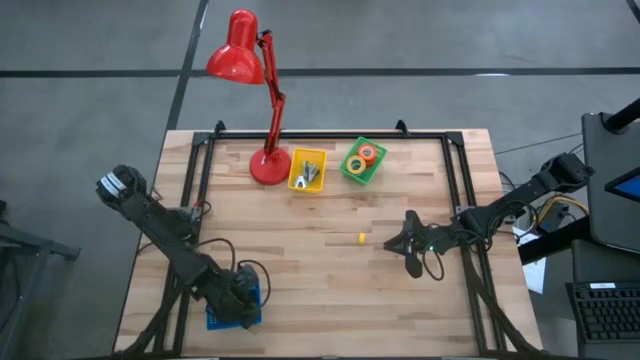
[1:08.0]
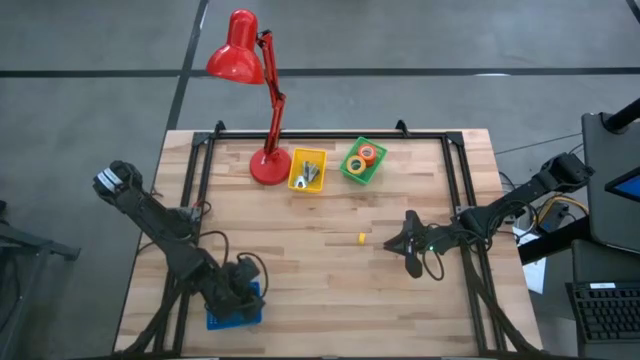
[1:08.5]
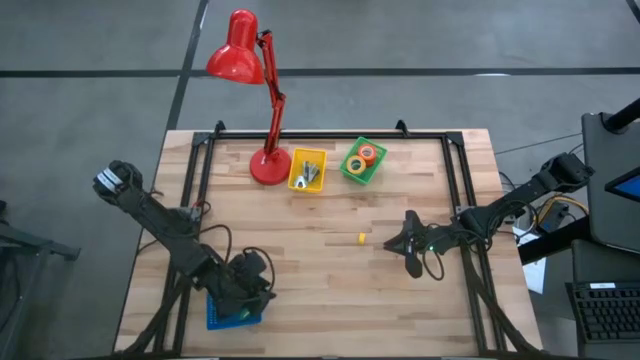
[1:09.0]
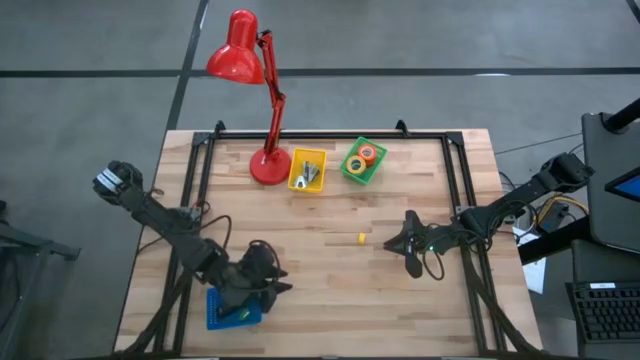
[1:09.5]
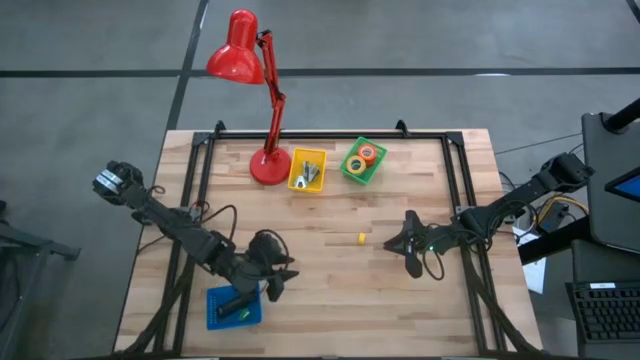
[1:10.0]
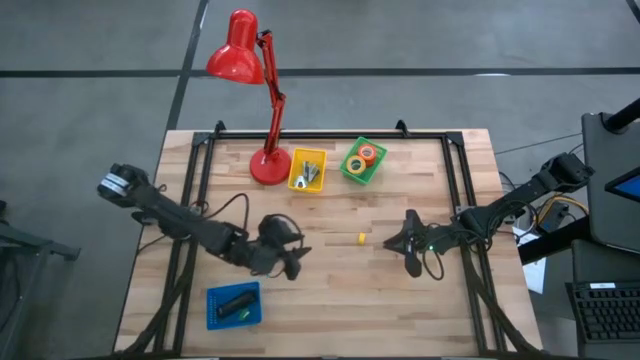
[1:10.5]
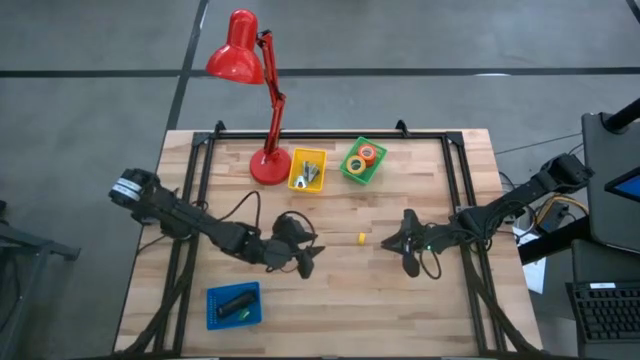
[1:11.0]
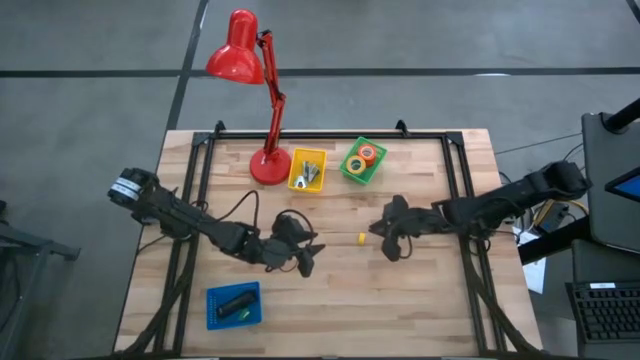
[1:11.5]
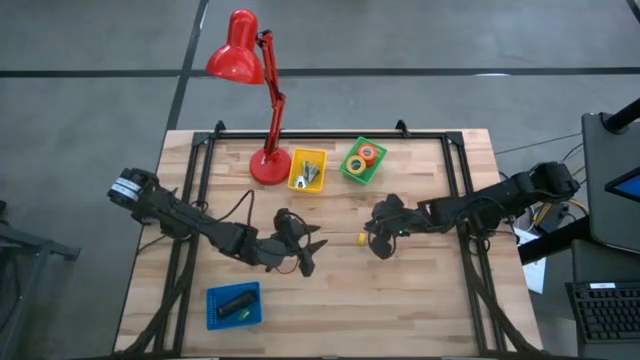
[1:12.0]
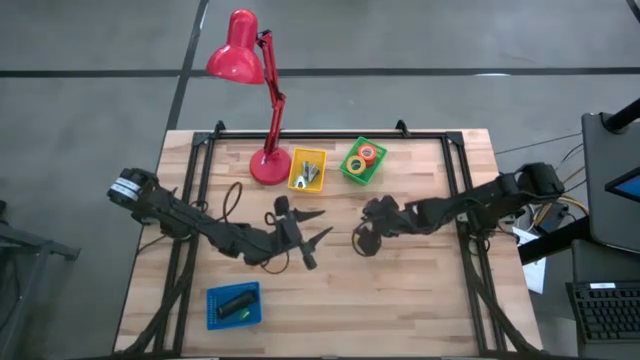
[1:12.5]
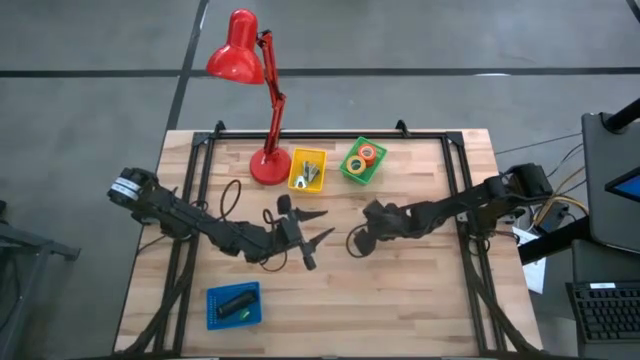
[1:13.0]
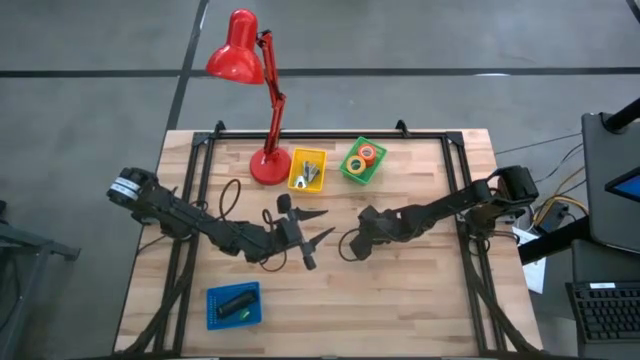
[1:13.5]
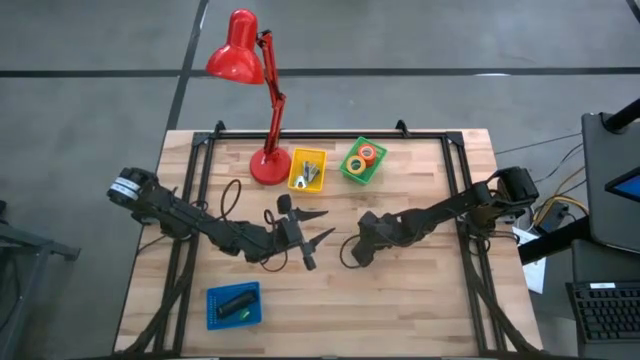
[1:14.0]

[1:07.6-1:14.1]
Task: Pick and place Stapler, Stapler remover, tape
Put the small yellow stapler into the blue bin

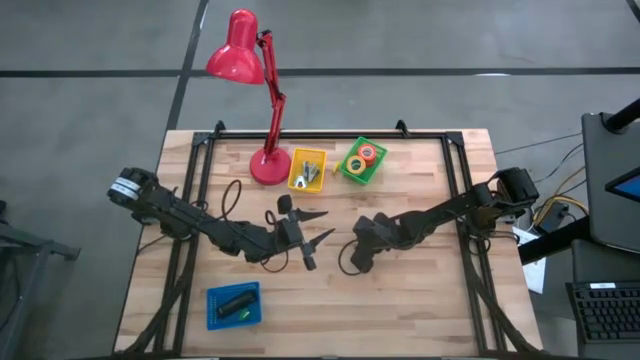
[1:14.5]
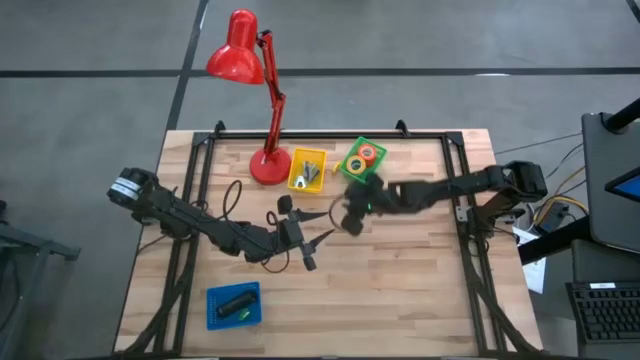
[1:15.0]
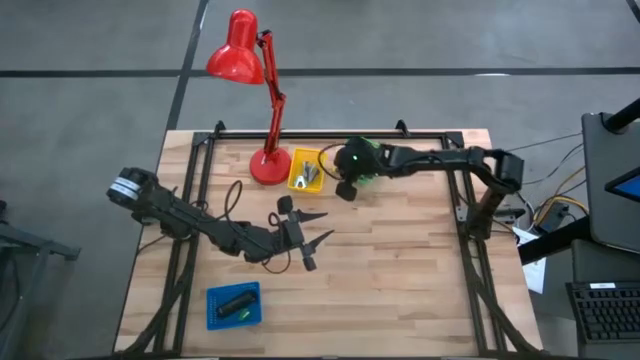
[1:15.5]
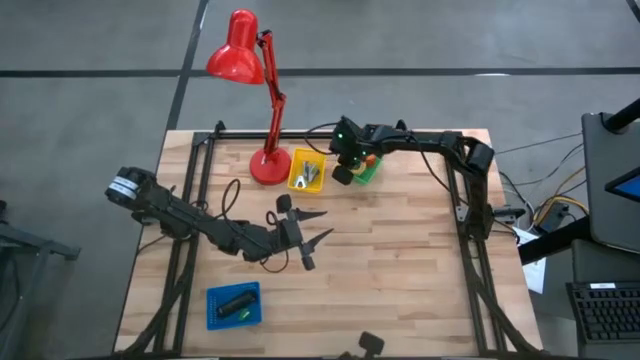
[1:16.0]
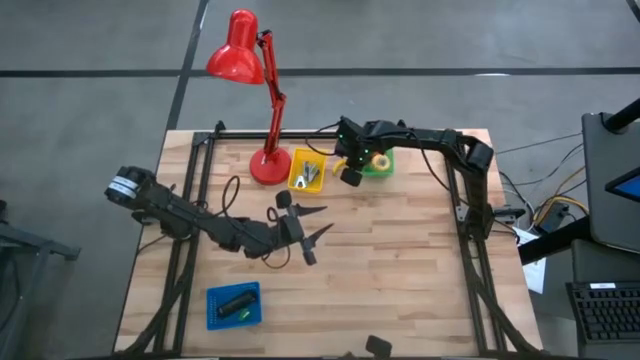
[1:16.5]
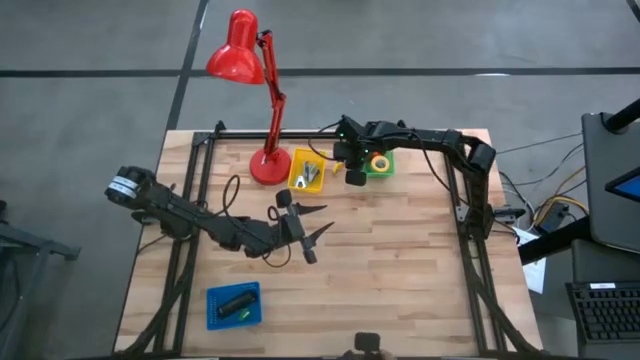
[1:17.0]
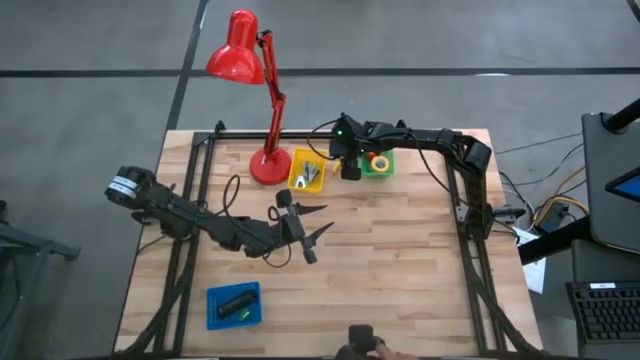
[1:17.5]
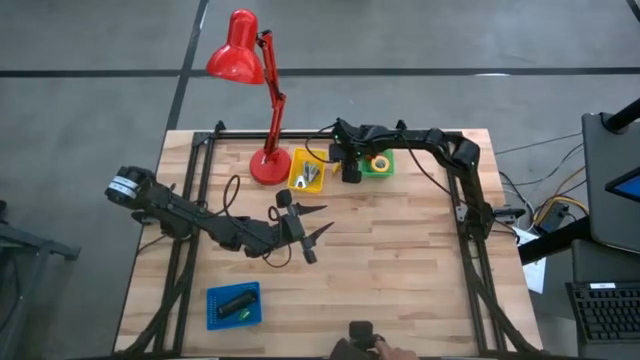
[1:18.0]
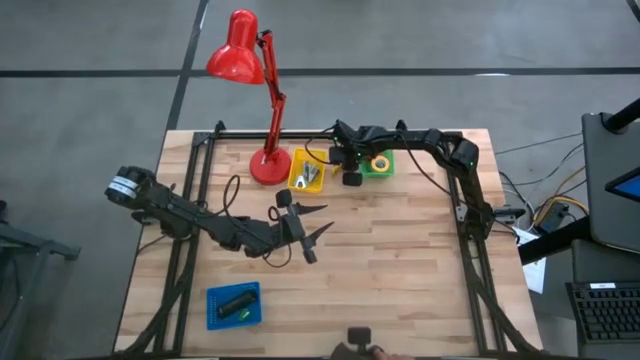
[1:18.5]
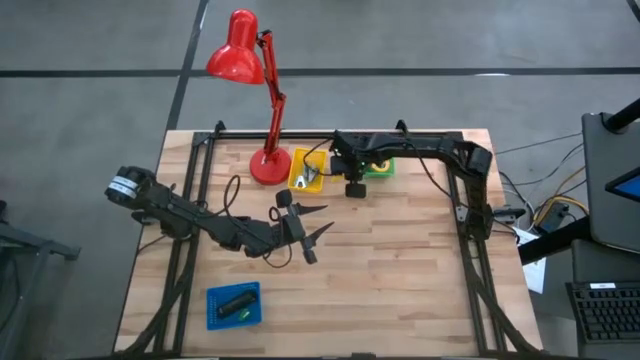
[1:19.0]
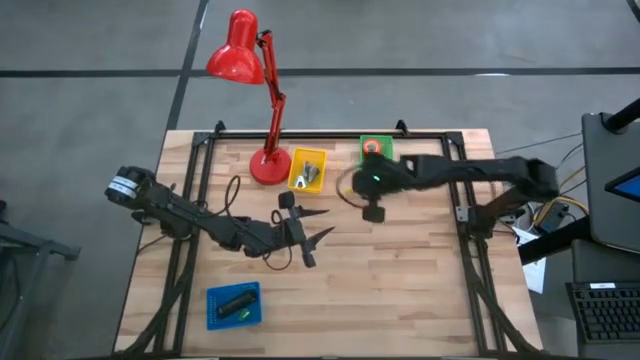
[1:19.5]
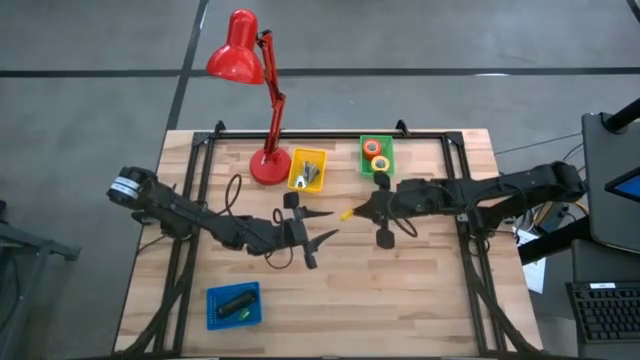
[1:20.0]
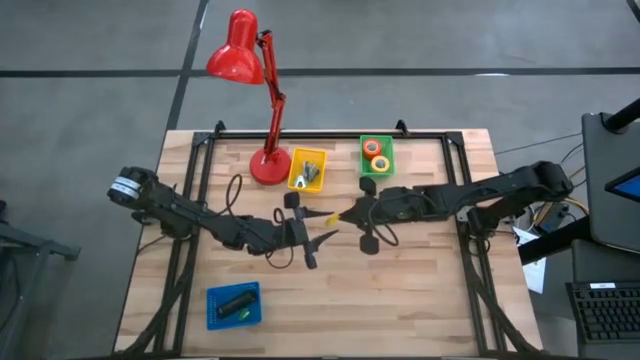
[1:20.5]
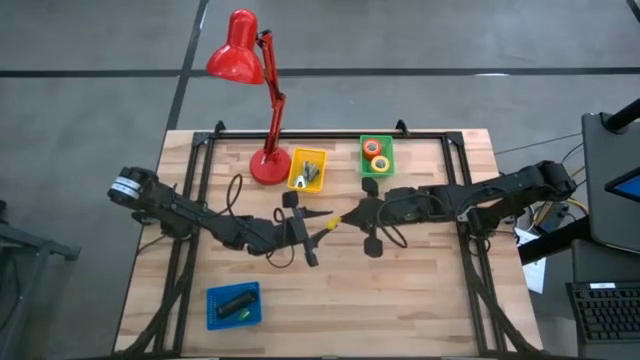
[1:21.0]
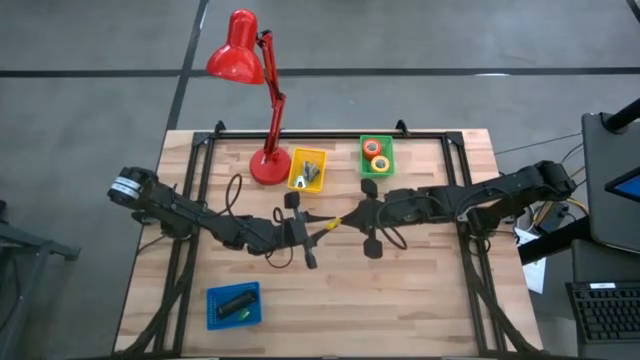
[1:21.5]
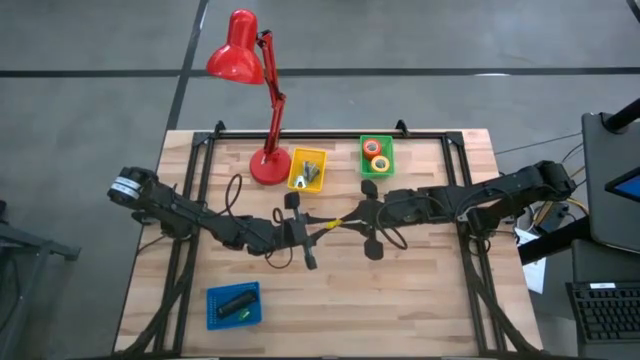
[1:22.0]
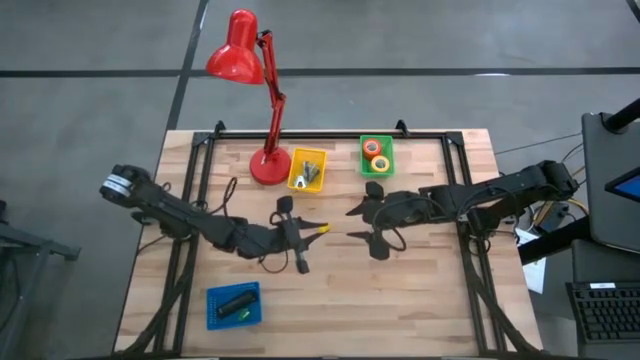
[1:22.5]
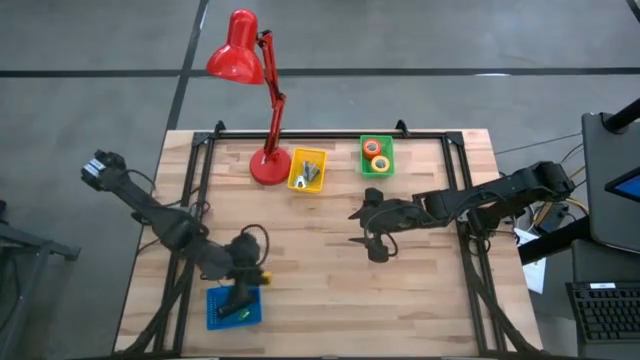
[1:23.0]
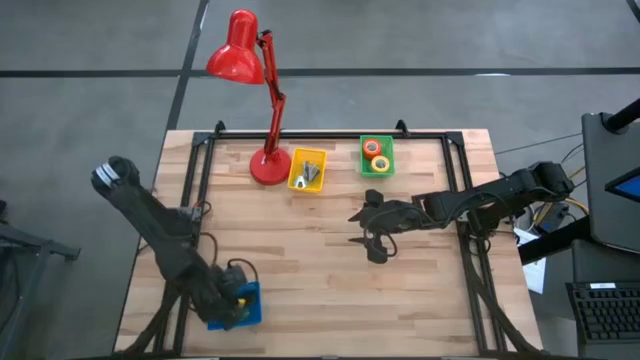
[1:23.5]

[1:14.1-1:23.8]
Put the small yellow stapler into the blue bin

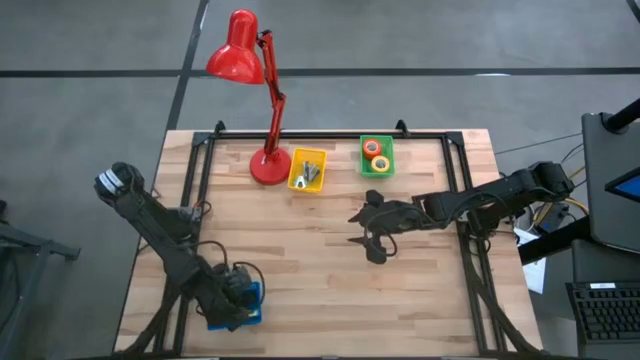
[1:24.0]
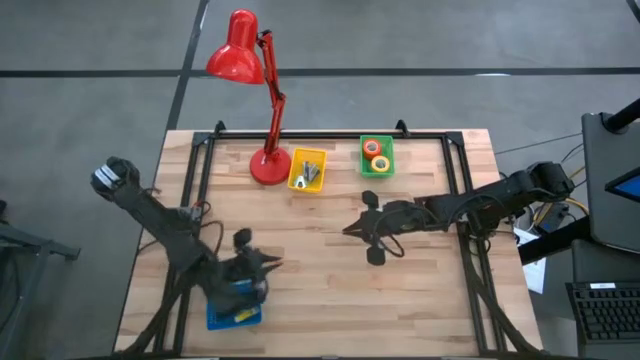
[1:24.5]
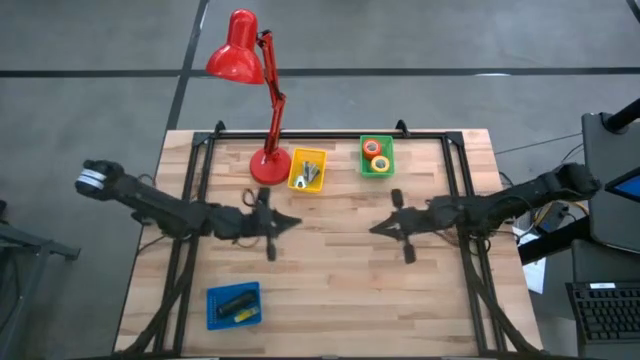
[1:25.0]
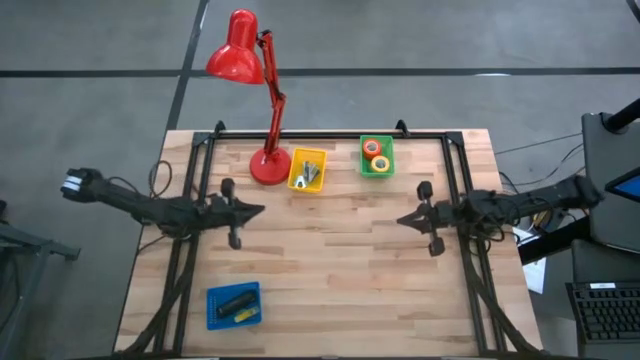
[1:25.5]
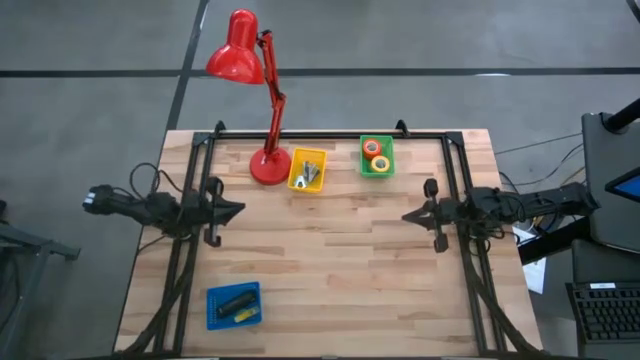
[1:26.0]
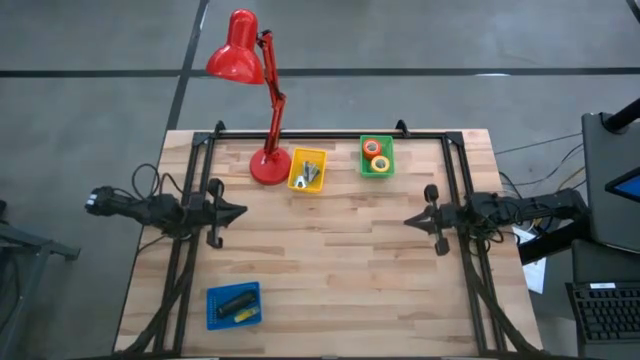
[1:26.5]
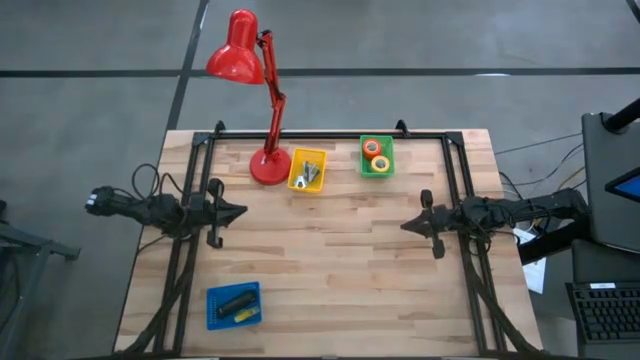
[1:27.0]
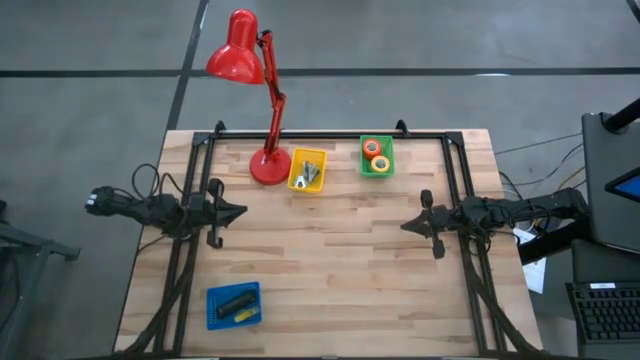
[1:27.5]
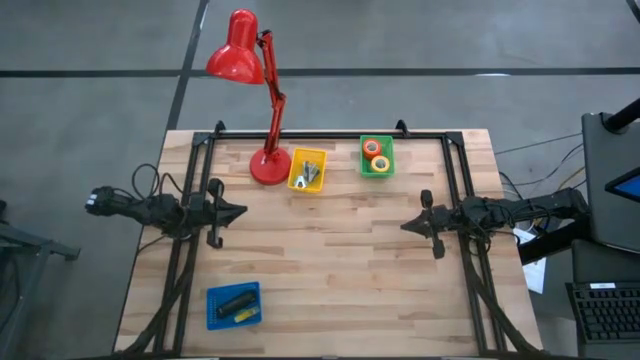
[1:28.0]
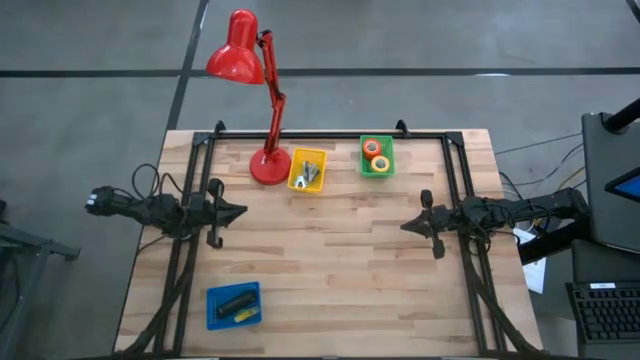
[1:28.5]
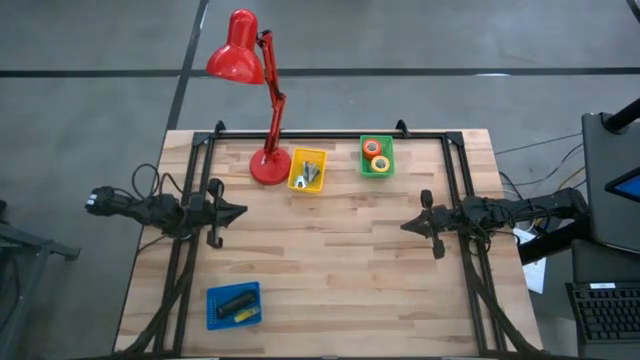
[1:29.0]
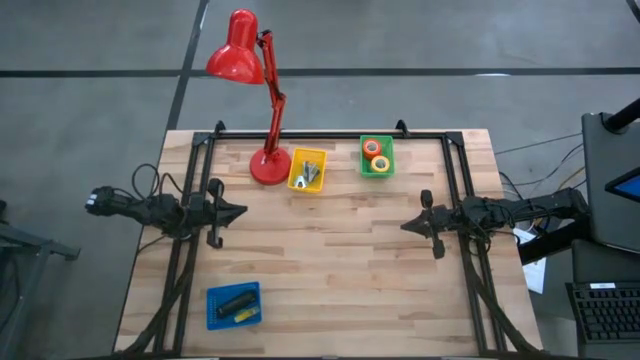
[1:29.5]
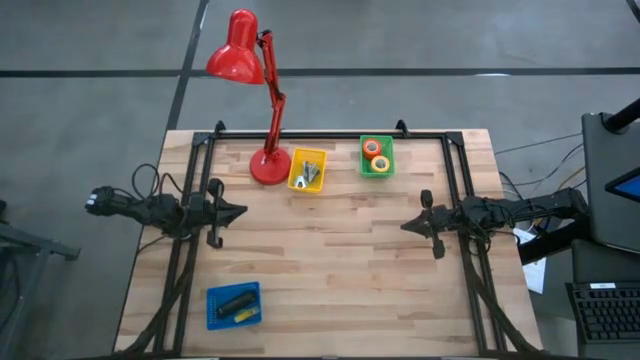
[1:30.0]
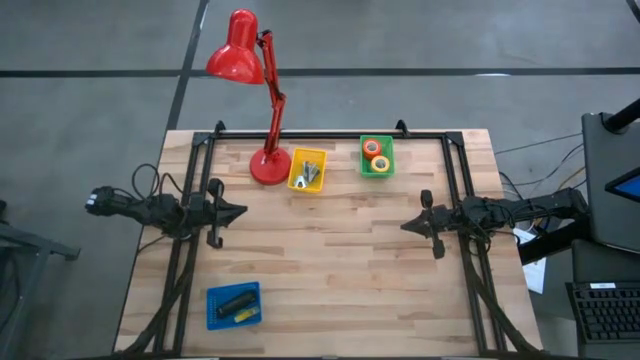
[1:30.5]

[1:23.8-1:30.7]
Return to Home Position
